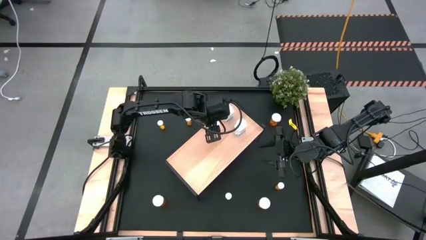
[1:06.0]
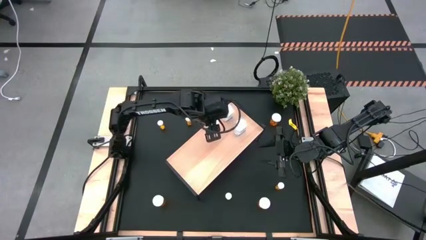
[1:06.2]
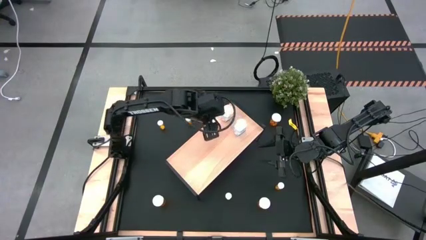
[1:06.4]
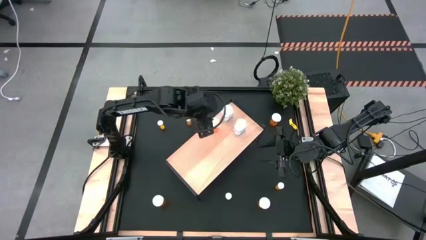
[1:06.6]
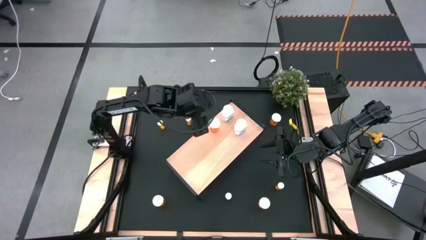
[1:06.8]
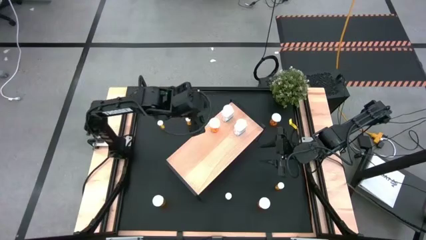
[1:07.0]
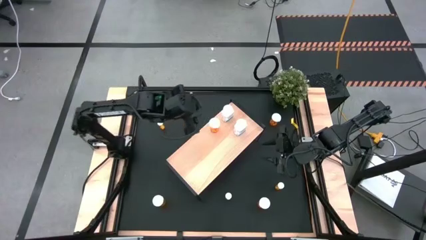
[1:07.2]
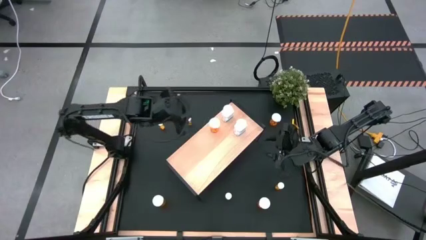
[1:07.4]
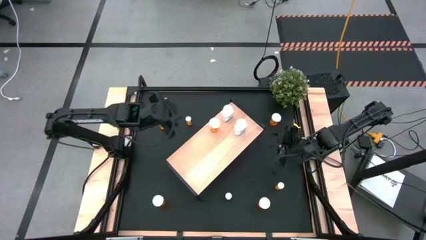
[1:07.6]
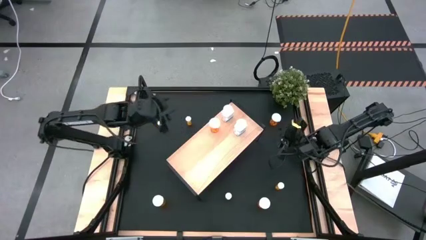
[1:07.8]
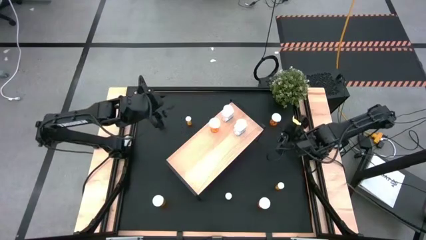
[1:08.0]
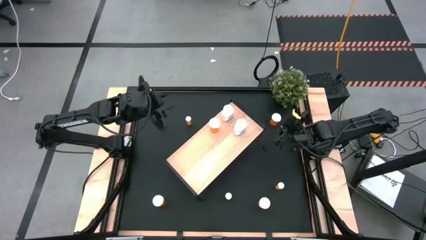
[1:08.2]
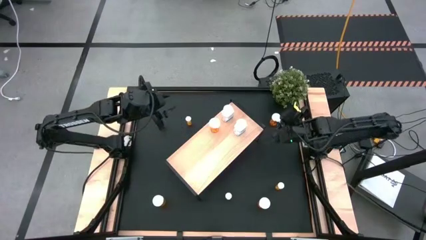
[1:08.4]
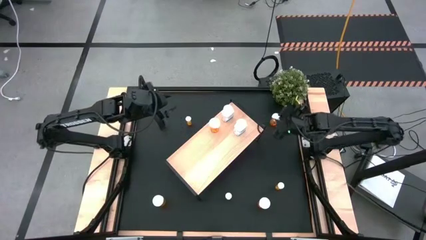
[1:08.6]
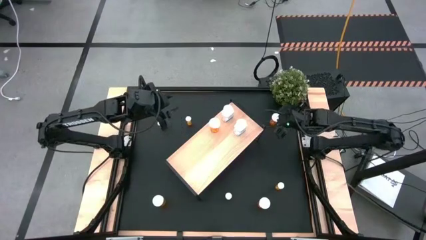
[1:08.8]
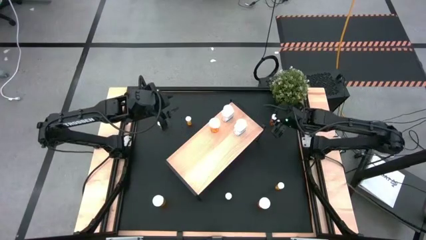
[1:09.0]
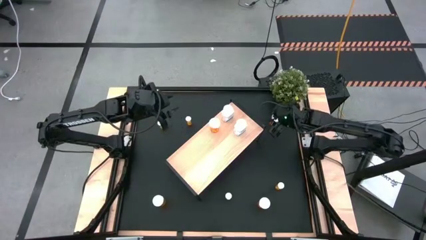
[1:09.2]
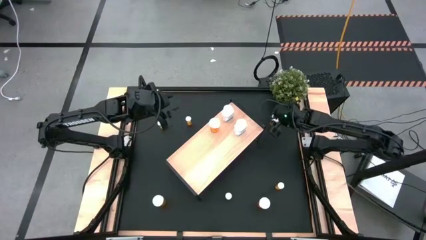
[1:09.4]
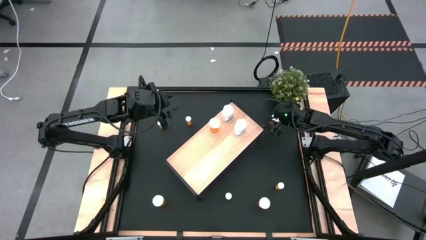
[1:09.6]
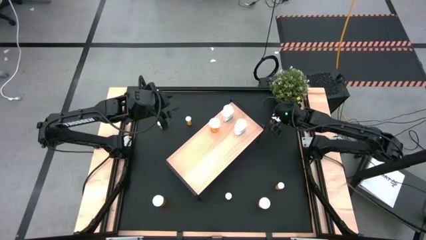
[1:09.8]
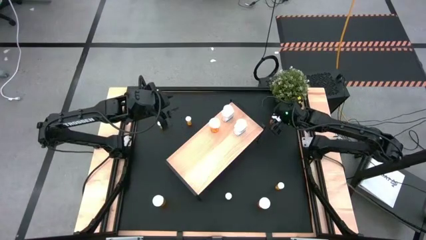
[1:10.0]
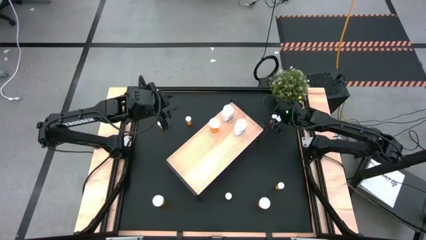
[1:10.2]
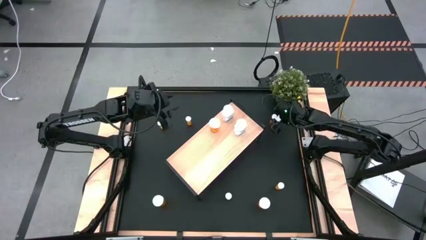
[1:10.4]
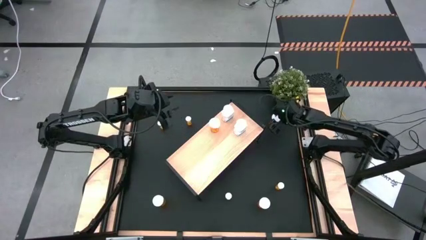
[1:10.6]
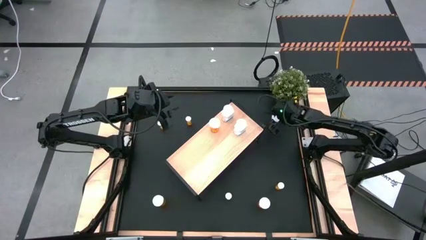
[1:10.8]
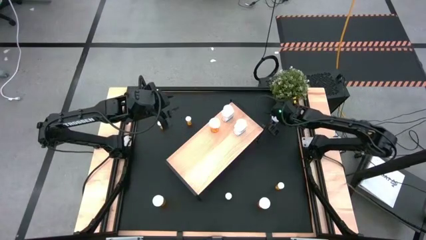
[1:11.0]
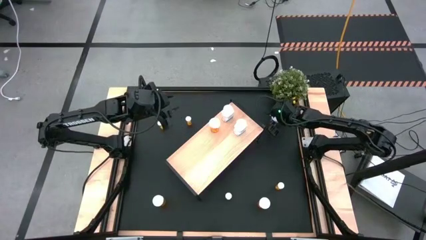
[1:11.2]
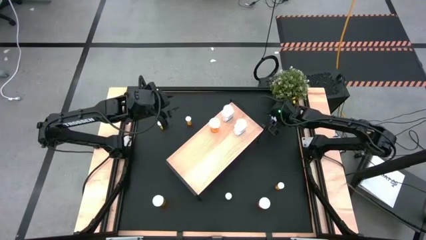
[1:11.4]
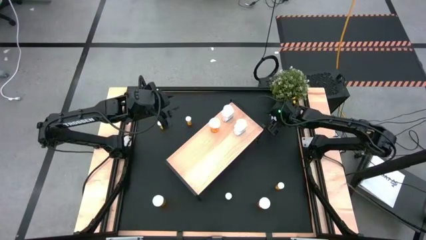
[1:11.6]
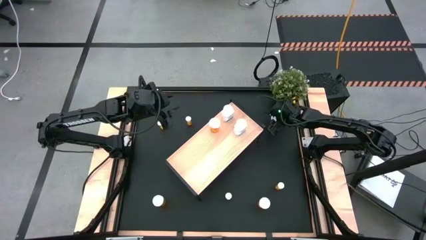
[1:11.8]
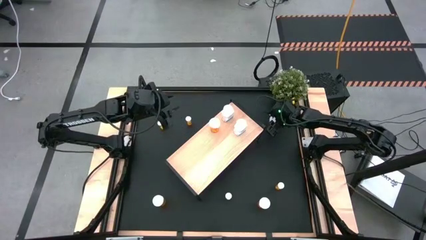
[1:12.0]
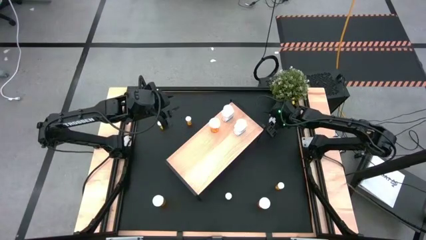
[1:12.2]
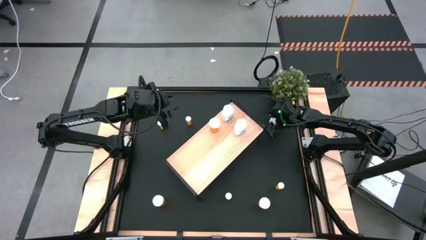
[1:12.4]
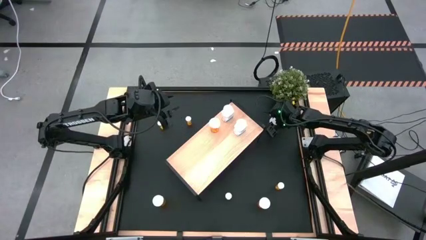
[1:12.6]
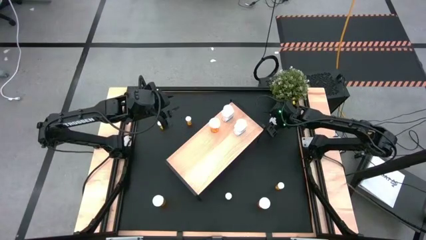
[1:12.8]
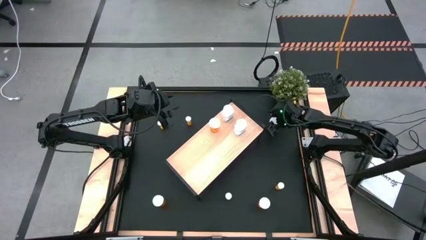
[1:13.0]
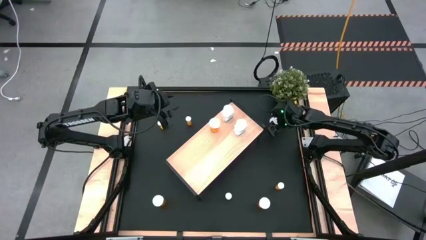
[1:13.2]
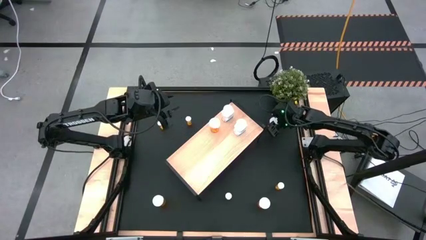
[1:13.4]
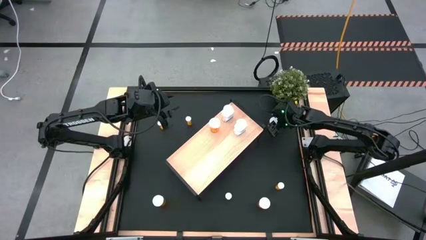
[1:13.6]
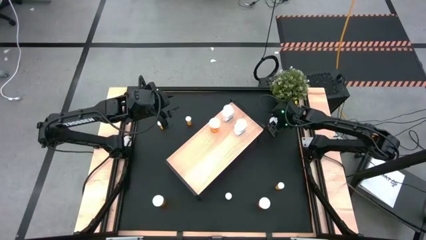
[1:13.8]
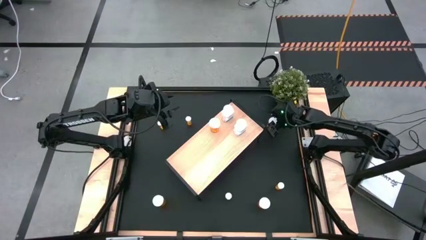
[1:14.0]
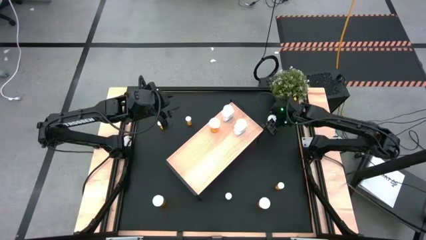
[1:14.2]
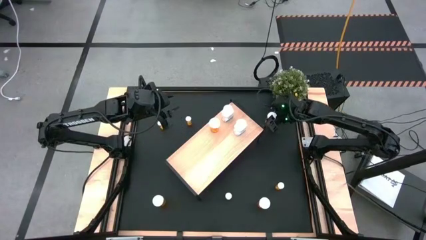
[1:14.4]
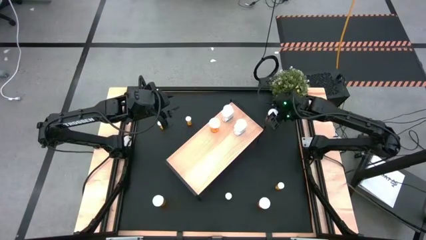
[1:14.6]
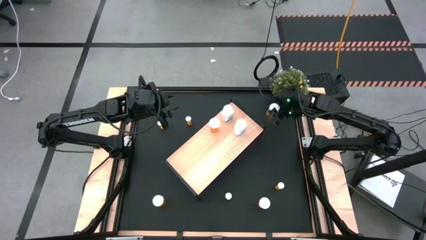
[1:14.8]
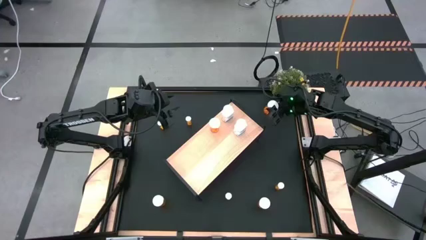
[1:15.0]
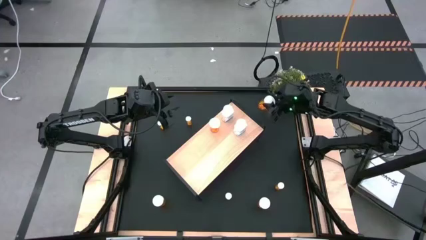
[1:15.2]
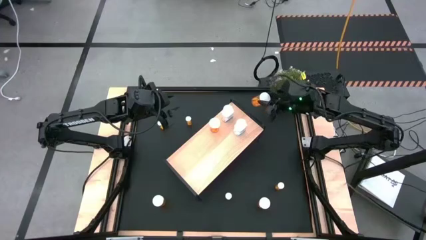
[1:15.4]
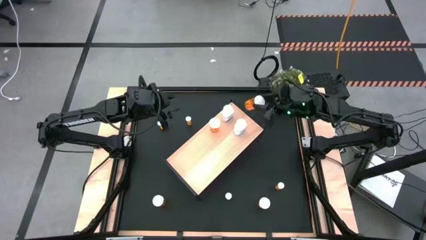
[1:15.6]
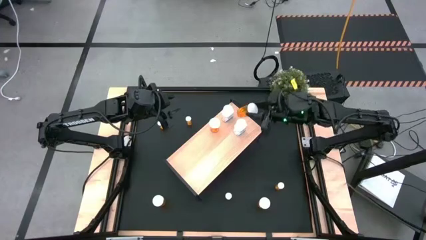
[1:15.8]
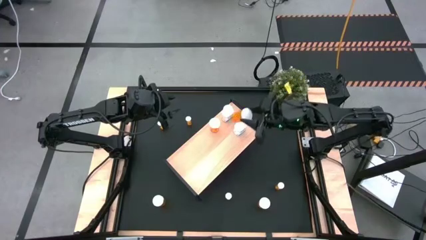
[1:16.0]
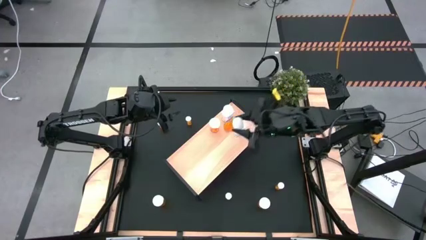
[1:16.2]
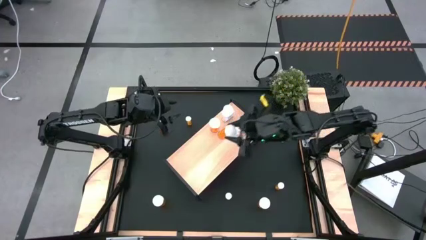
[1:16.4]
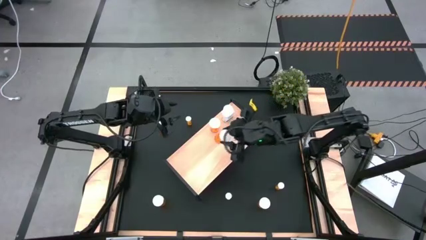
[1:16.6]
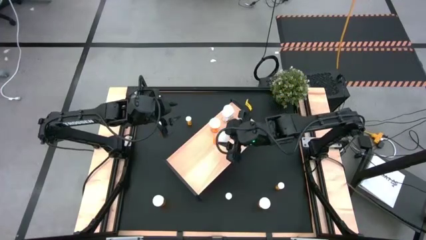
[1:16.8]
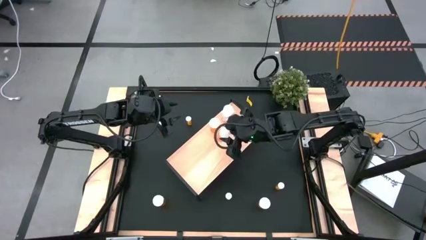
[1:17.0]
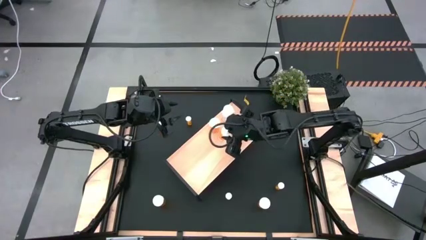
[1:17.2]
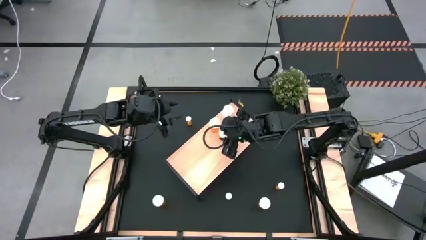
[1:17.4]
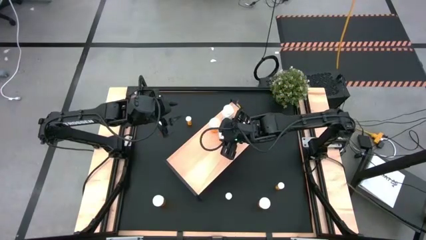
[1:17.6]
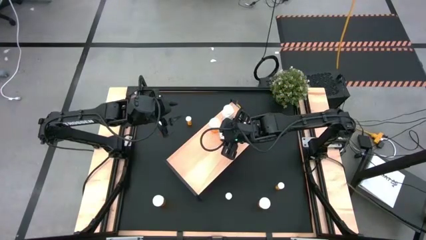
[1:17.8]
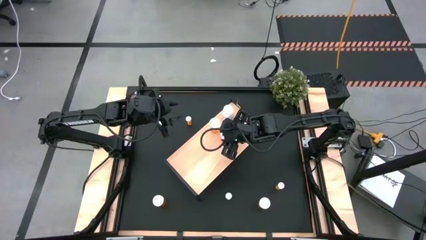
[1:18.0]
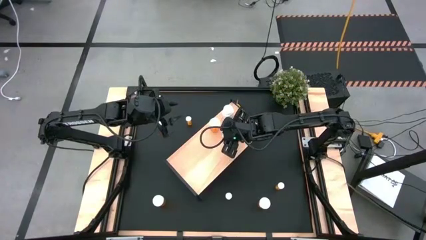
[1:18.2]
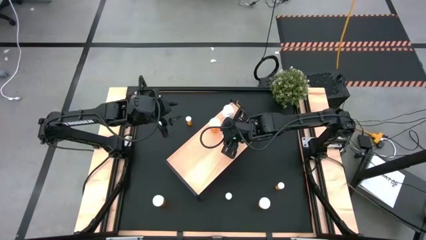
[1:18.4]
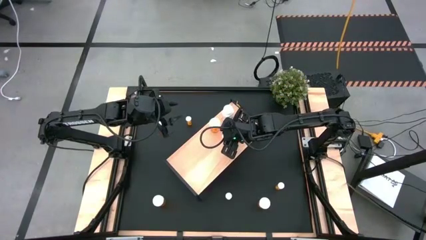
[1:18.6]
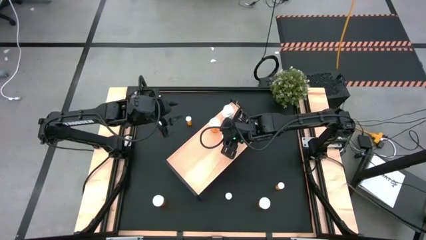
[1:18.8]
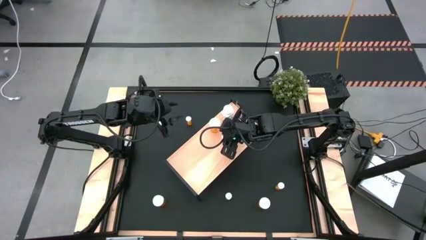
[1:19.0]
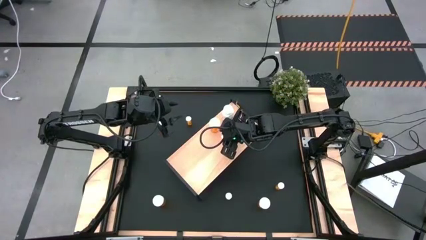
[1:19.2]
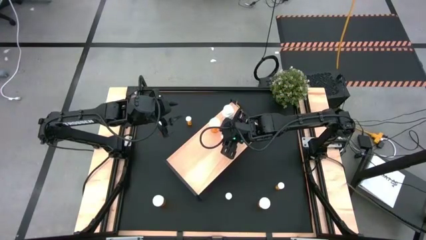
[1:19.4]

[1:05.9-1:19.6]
Task: Pick and place medicine bottles onto shelf by color
Put the large orange pill bottle on the shelf
